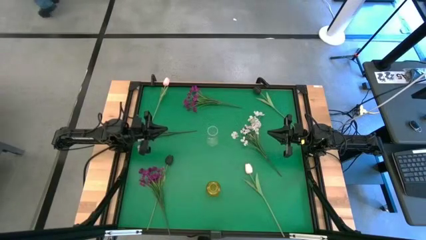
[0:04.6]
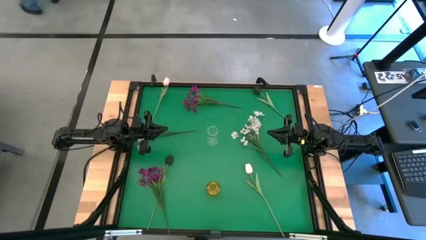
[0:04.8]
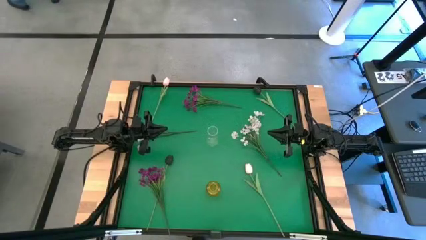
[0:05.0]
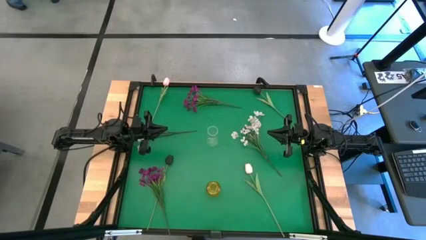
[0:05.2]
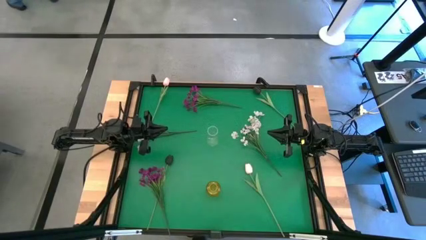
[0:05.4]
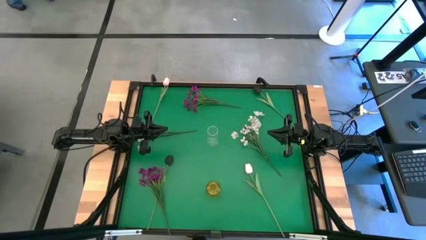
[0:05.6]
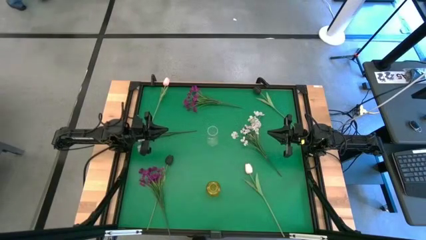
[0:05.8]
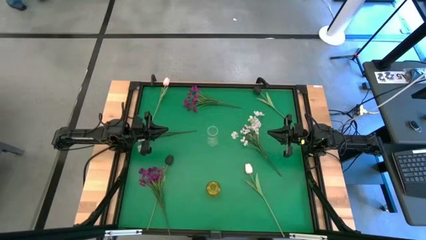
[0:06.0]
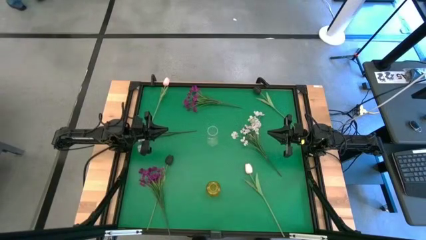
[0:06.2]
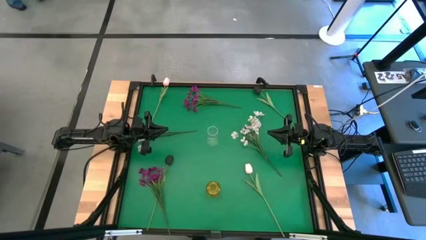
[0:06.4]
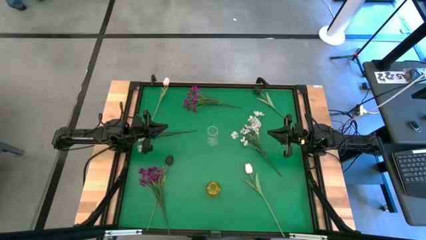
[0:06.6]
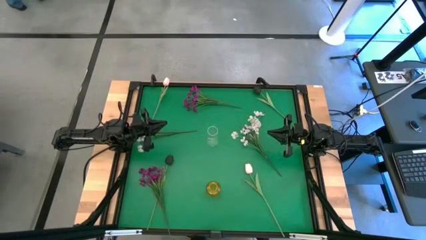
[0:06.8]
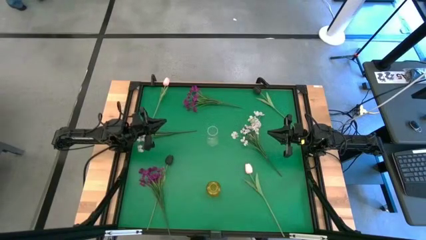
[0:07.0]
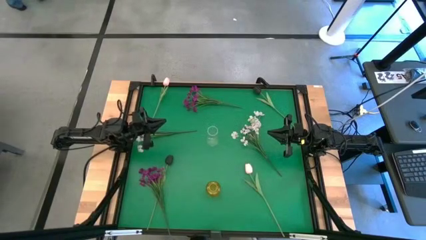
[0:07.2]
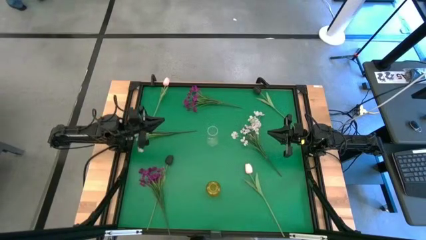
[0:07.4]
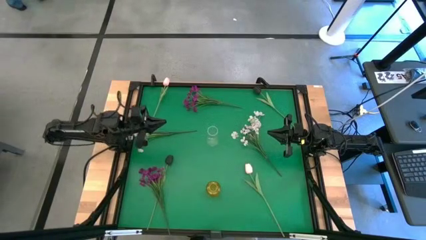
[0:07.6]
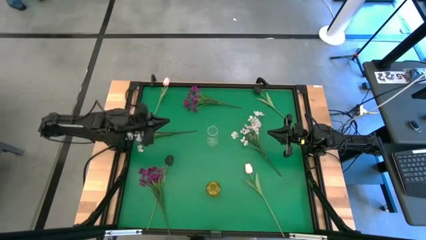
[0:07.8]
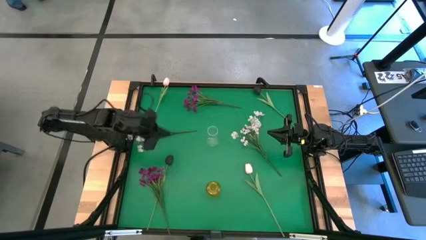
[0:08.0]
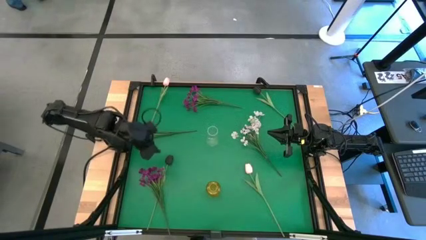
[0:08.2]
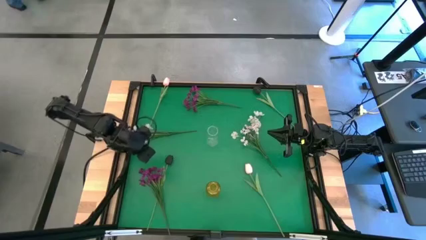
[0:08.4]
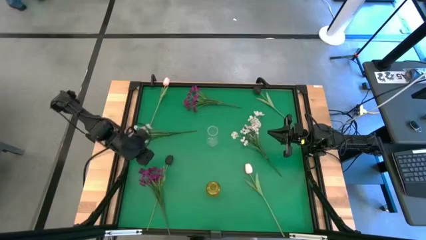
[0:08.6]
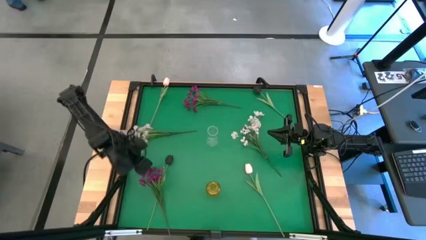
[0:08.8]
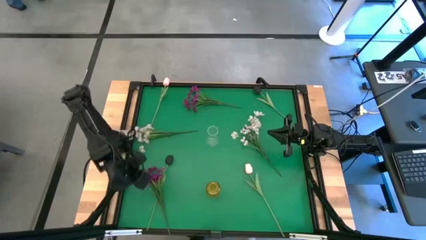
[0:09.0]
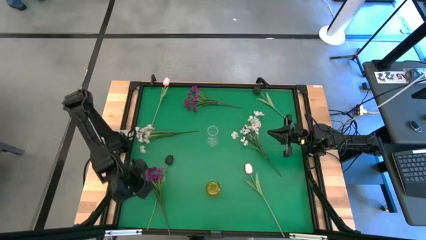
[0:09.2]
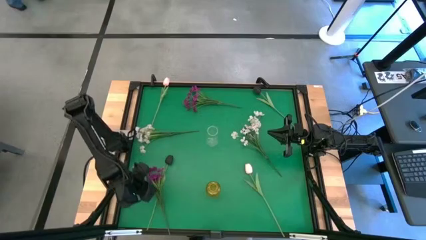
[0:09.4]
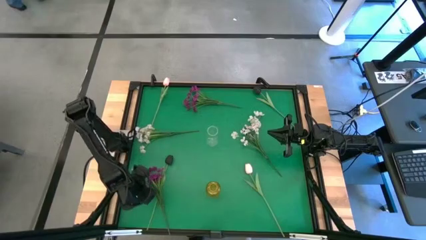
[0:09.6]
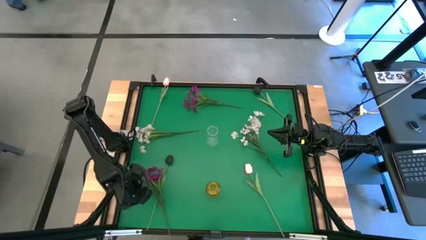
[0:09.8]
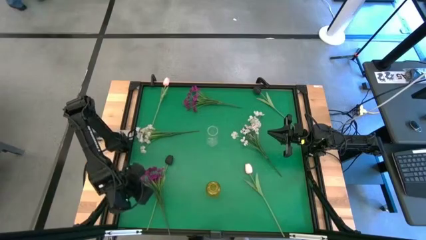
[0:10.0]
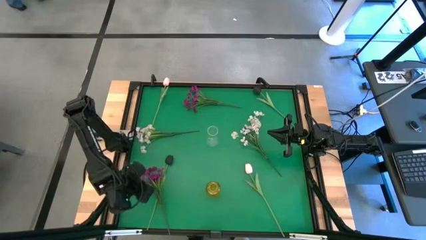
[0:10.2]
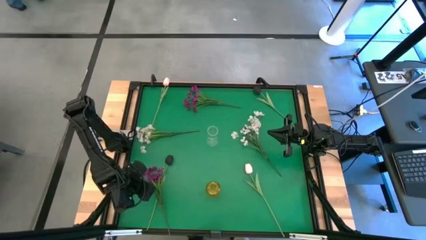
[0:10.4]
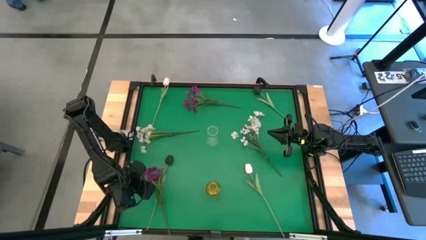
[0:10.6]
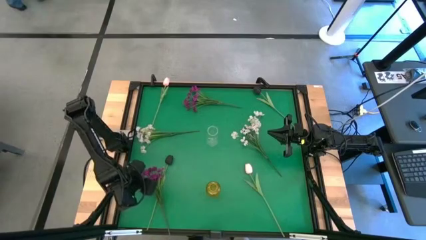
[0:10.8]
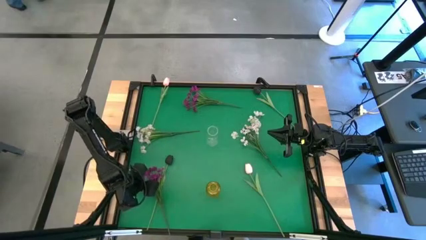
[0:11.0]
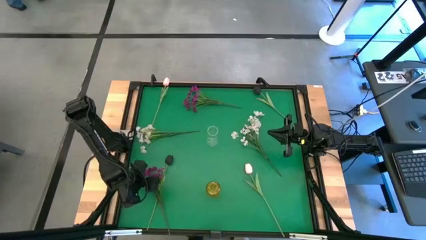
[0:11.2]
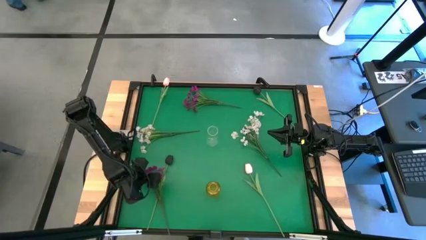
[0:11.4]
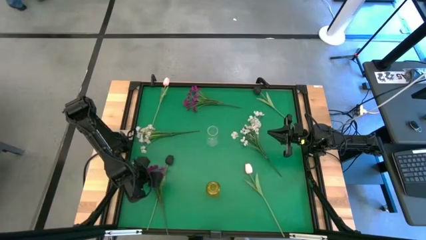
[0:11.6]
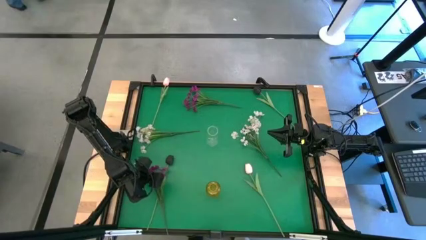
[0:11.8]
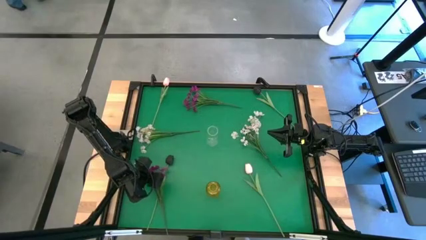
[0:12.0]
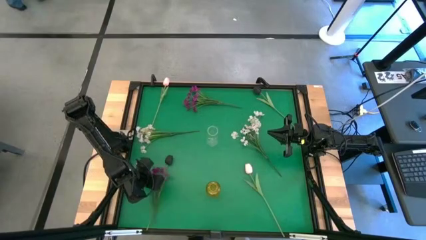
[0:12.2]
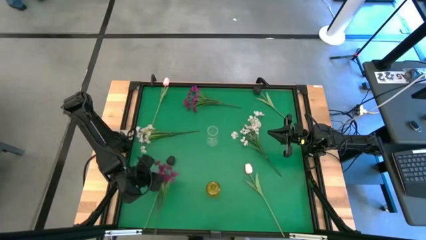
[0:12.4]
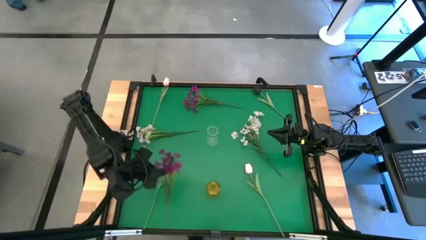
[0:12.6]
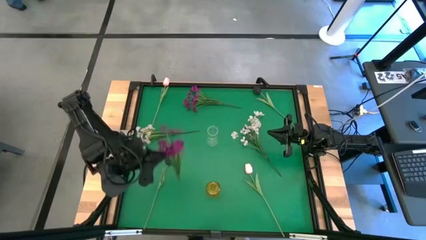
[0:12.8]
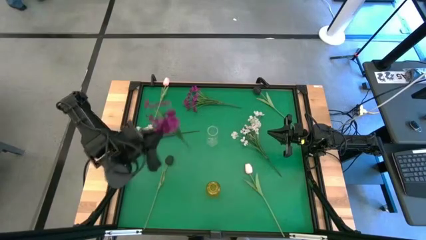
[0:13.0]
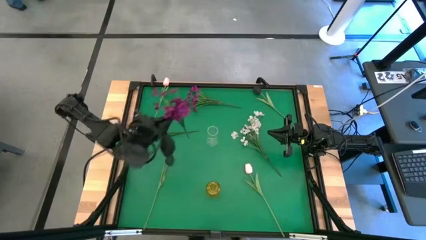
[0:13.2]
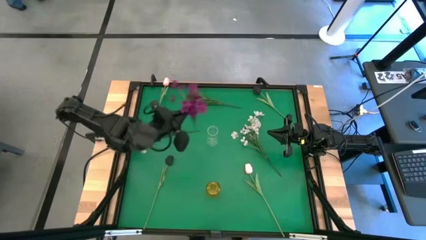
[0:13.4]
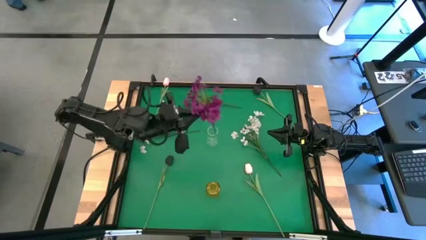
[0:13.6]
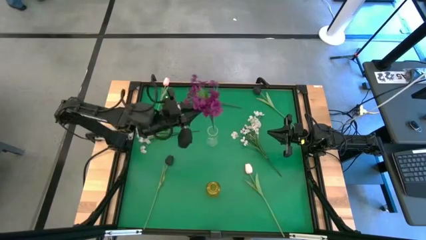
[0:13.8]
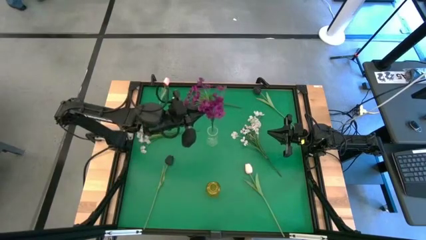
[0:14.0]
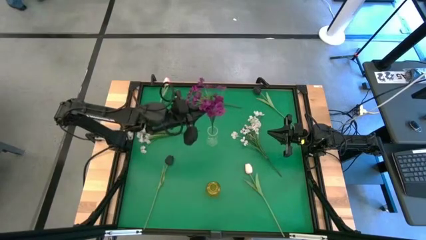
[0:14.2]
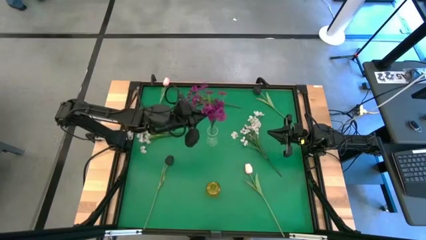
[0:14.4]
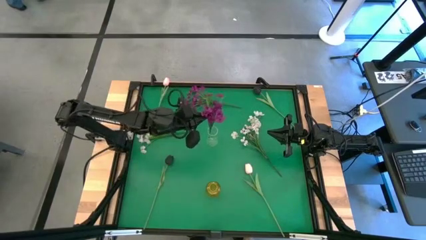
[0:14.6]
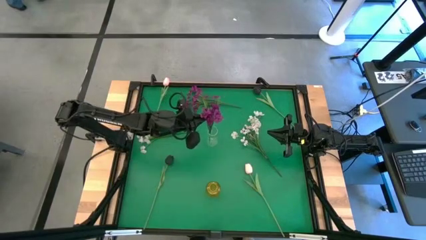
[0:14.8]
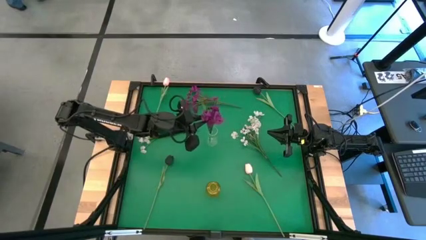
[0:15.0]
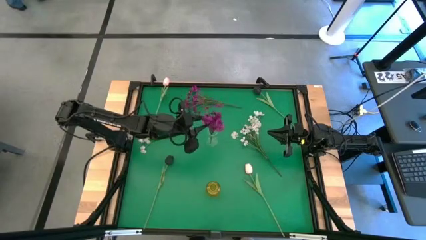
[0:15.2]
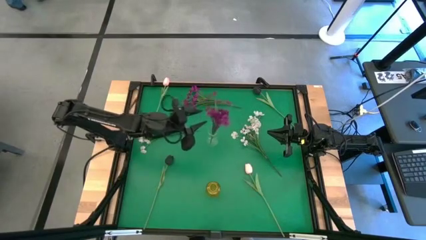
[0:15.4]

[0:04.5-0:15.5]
Task: Sort flowers into vase by color
Put the bottom purple flowers into the transparent vase

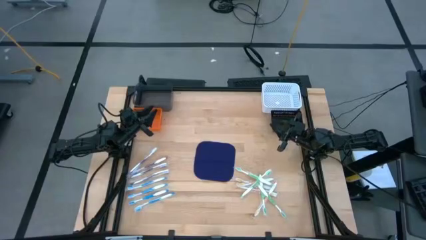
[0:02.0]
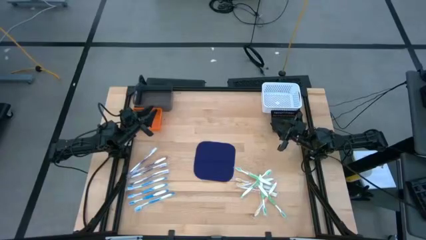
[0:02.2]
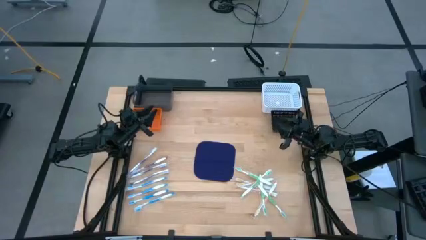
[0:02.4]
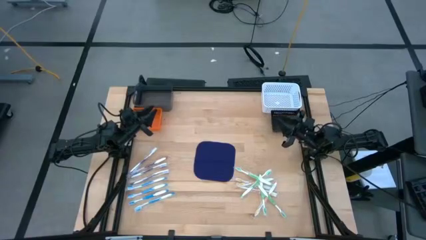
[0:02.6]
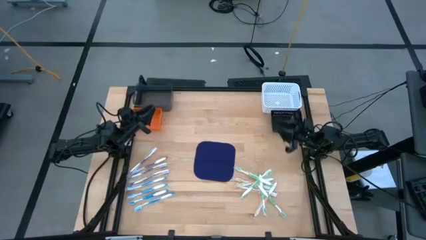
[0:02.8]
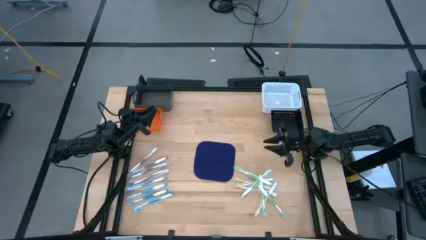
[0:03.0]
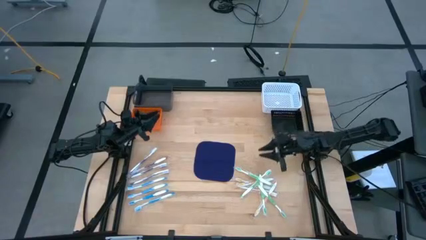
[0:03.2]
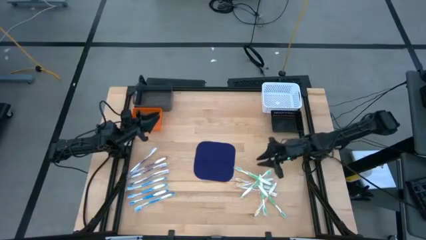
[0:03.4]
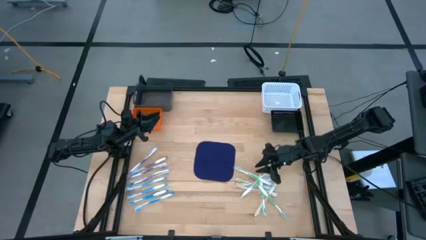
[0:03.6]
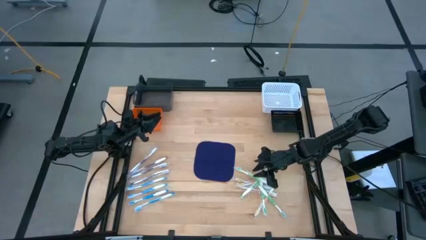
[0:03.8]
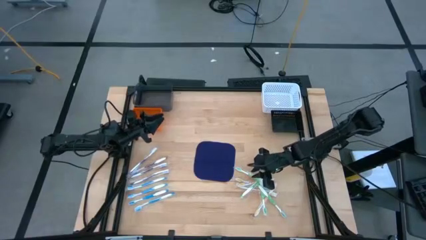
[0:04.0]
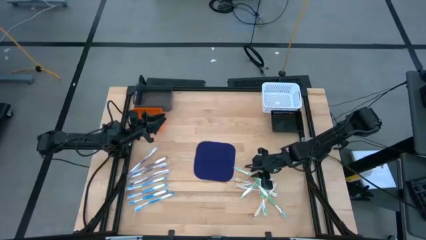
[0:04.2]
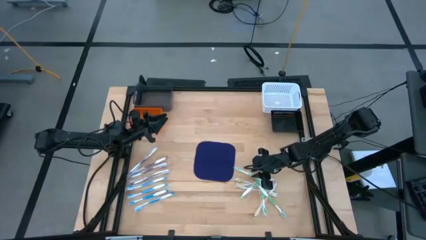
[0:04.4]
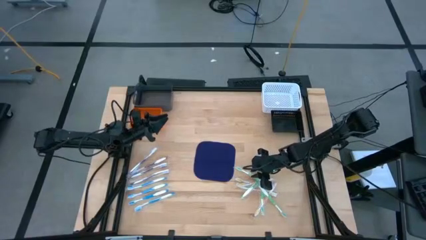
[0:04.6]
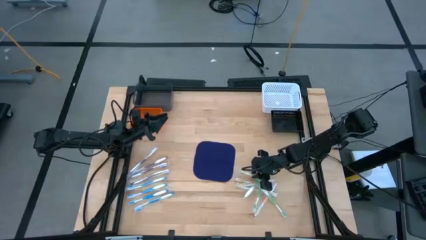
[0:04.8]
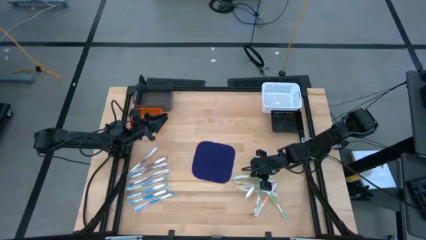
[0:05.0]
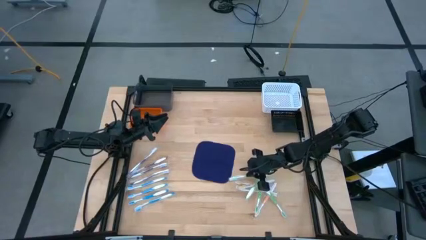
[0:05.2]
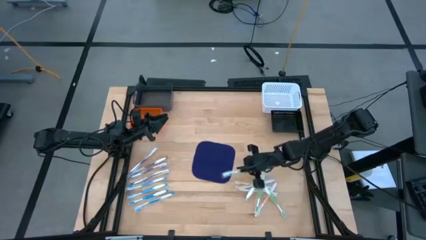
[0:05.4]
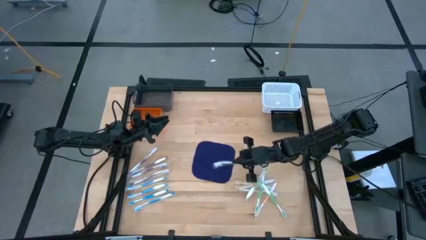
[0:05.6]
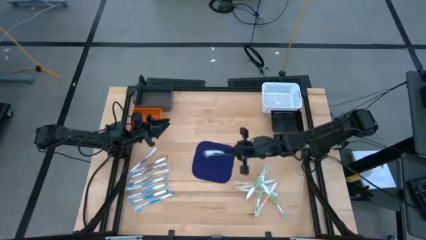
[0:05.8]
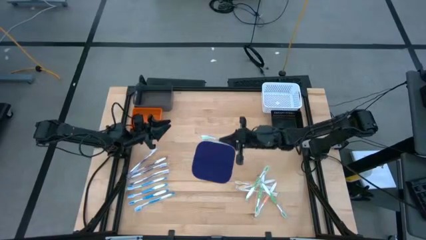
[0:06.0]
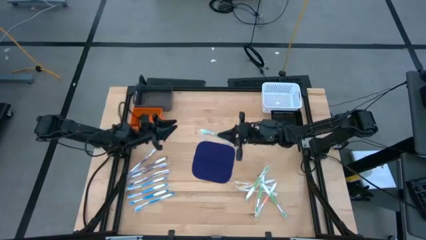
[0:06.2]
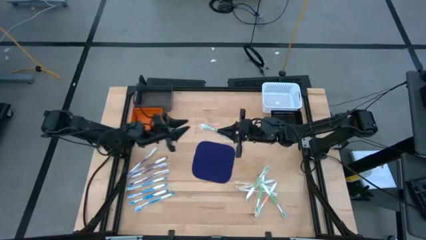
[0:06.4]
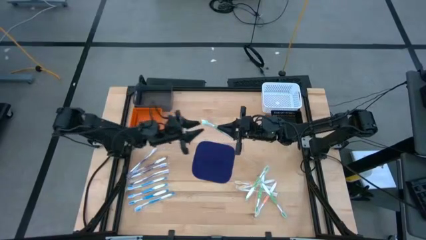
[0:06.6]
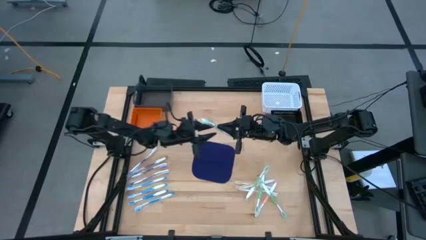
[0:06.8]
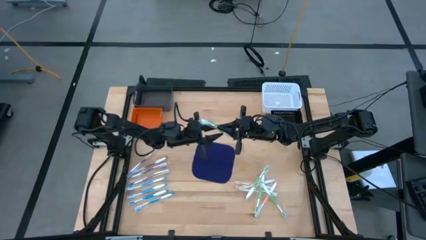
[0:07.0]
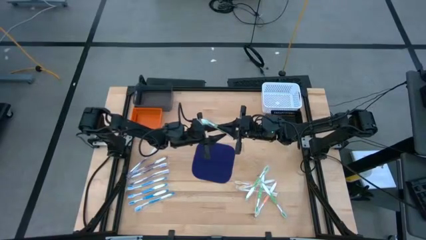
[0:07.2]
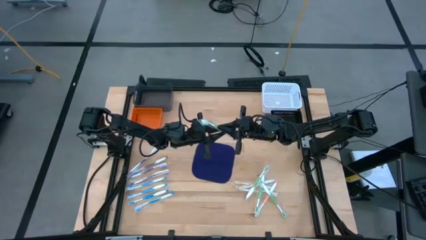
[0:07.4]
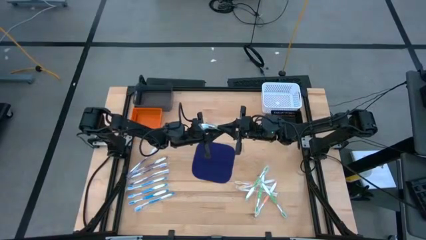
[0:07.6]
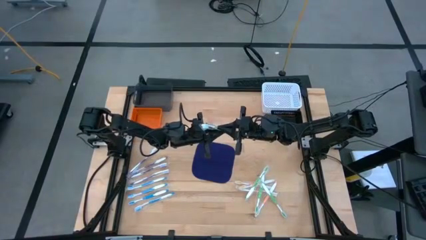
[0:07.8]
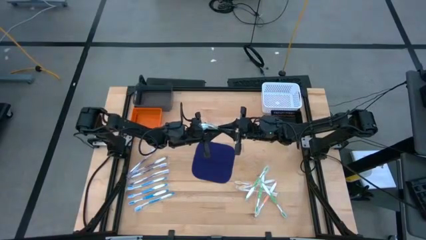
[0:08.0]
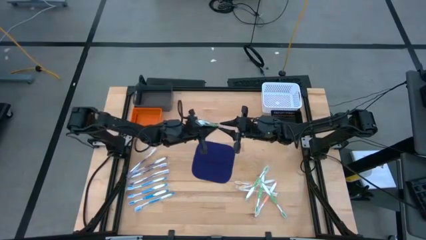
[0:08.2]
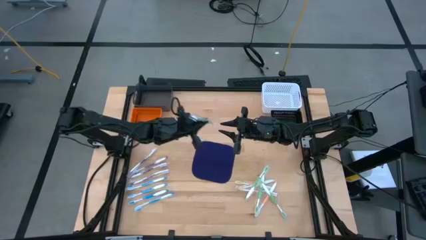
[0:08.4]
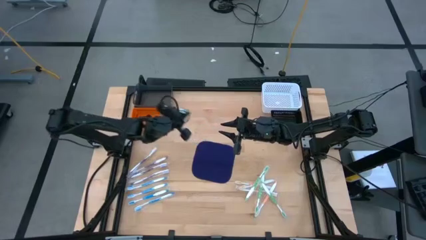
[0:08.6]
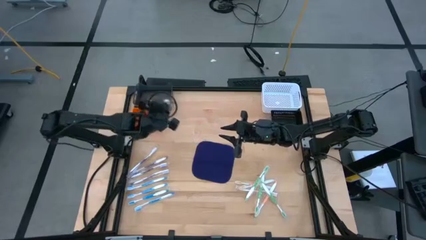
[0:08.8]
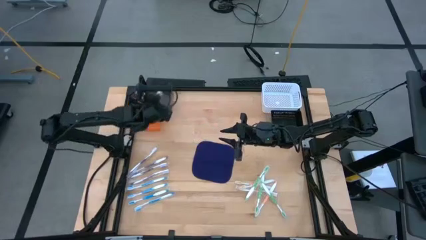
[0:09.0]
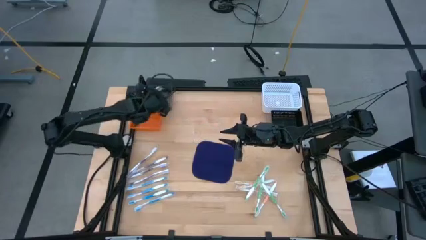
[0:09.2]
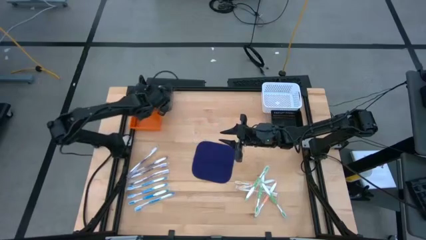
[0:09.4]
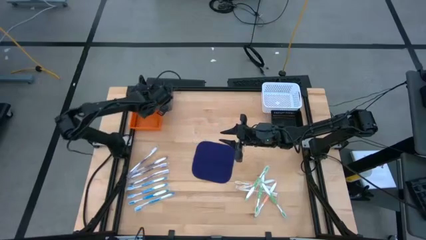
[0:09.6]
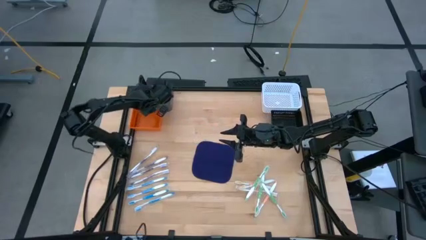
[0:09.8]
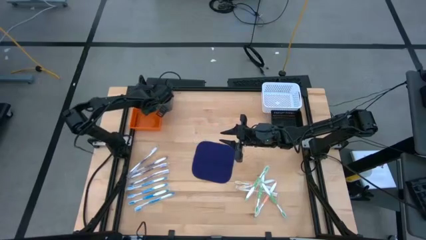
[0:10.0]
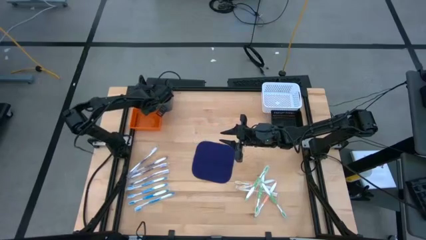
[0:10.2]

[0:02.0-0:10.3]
Task: Pick & Place Toothbrushes
Put the green toothbrush into the gray bin
